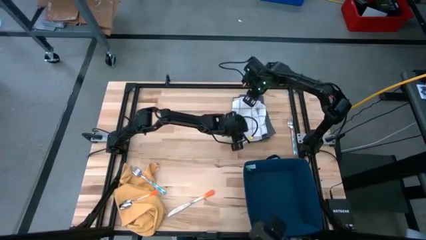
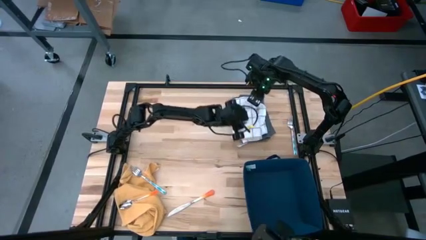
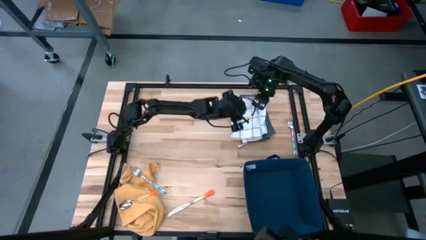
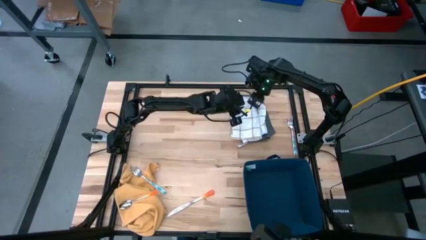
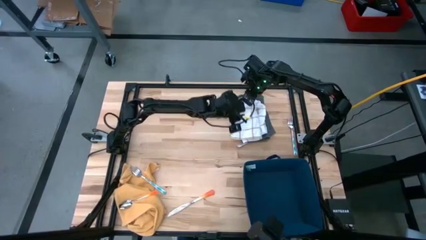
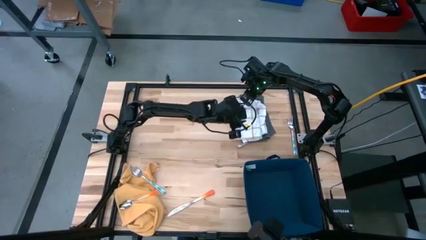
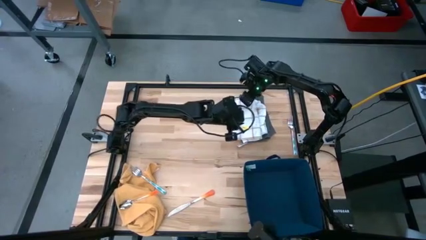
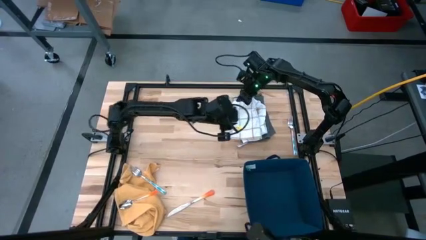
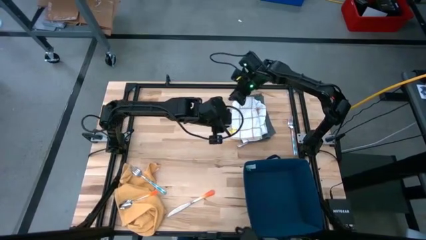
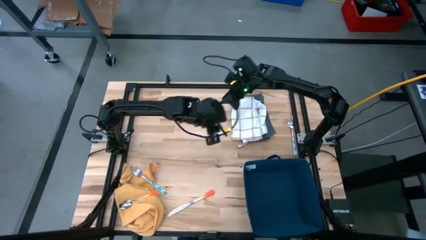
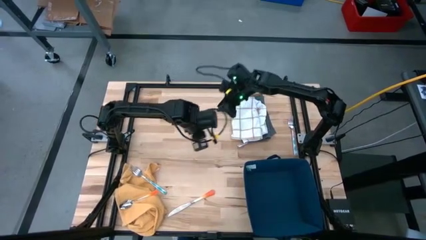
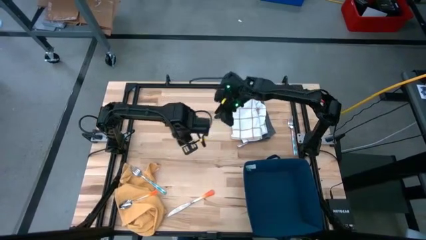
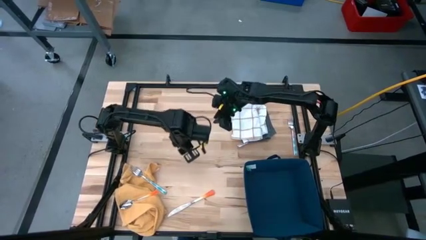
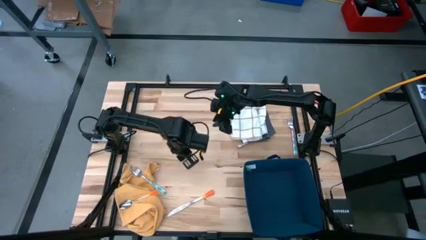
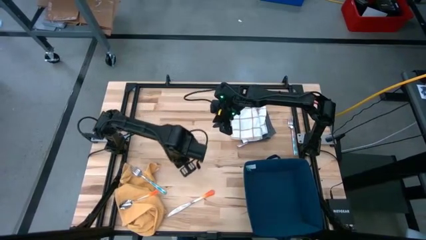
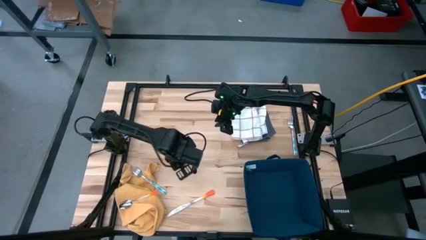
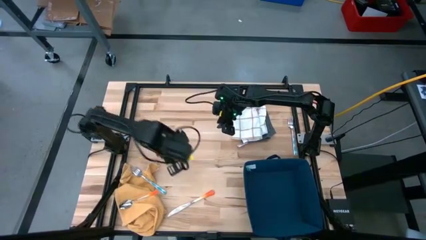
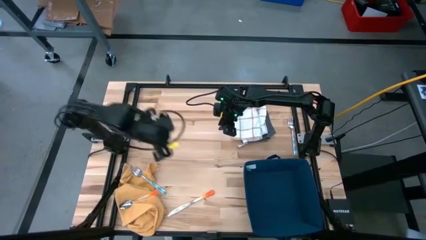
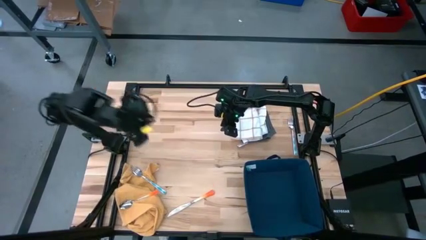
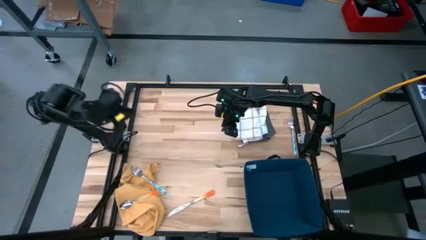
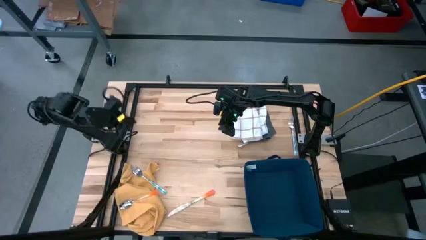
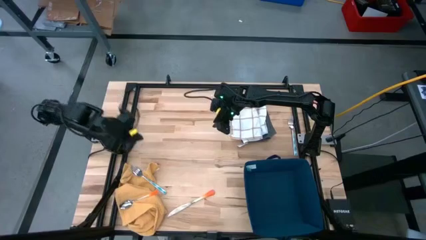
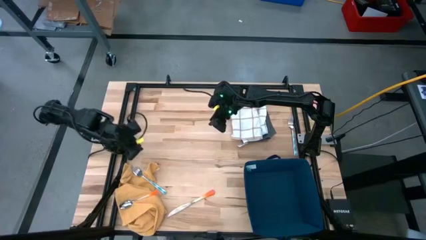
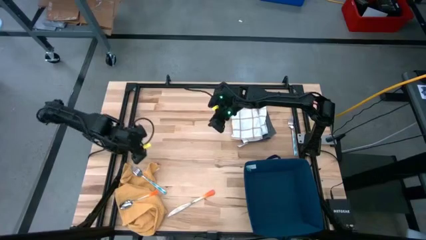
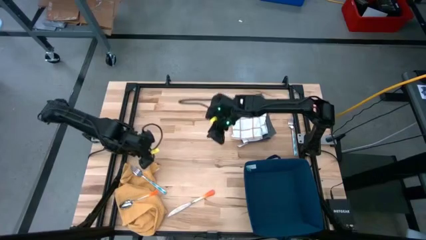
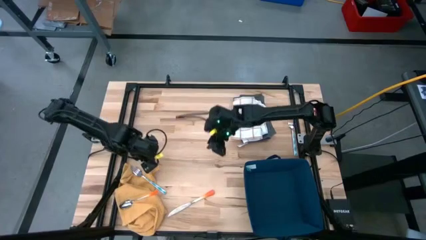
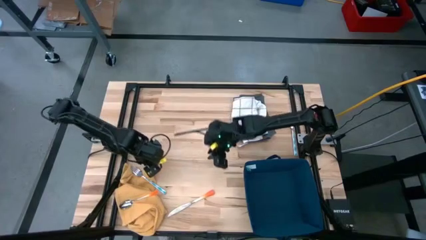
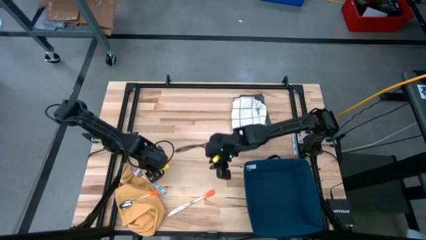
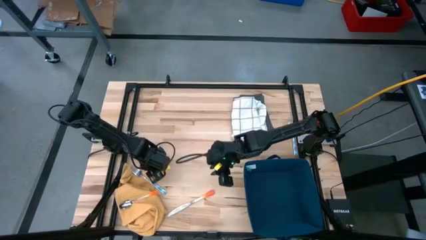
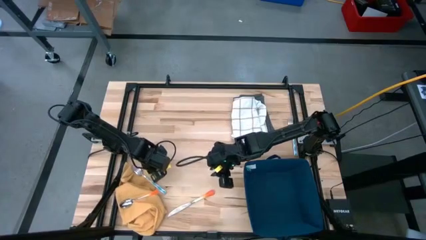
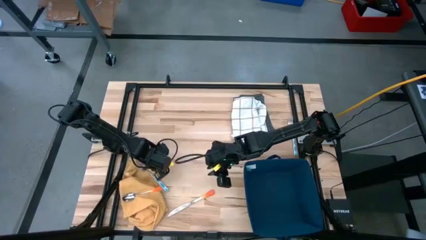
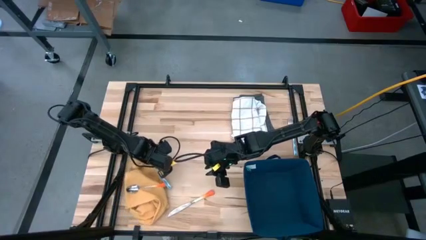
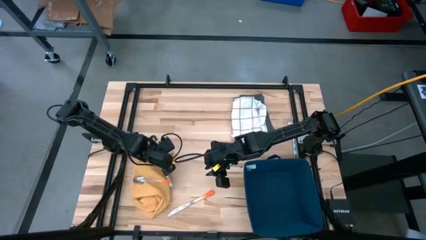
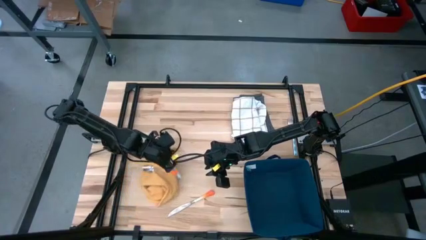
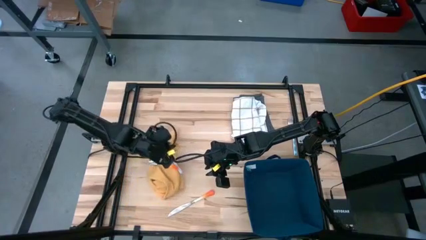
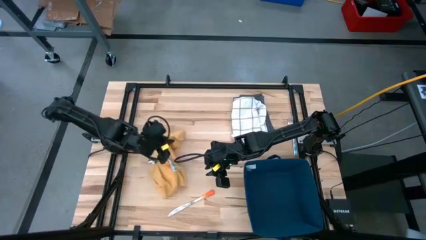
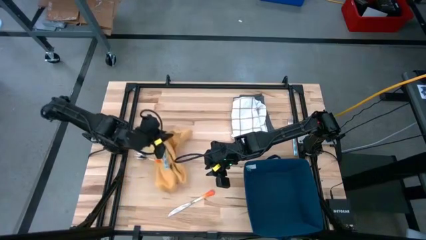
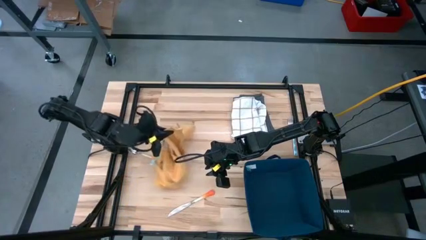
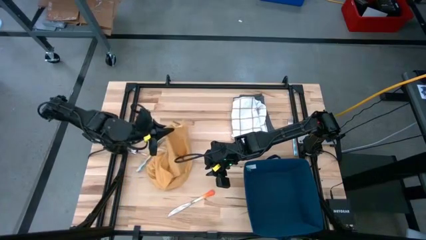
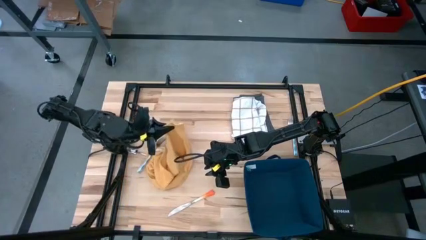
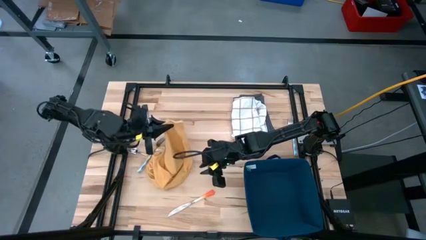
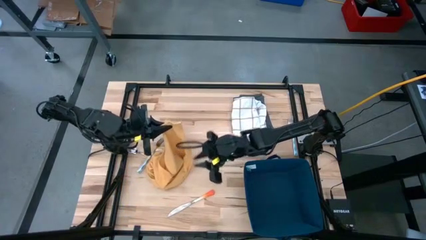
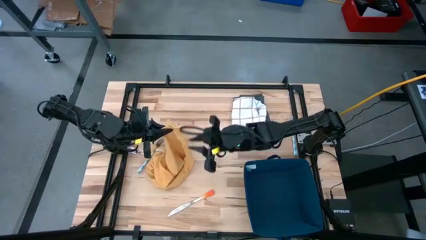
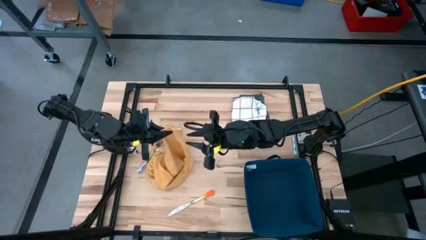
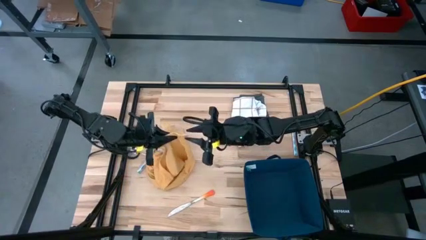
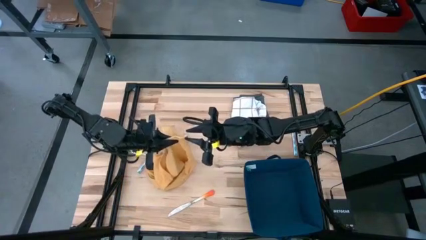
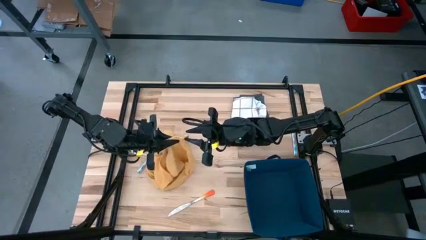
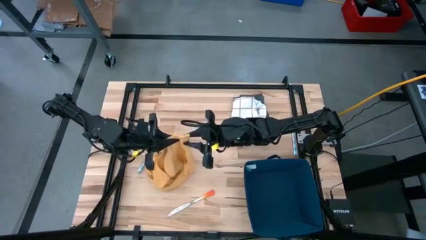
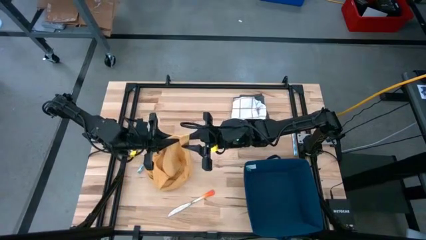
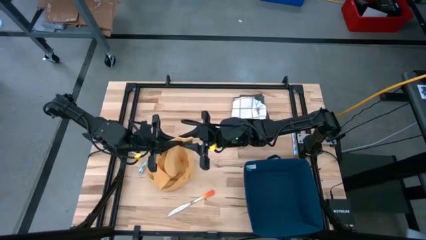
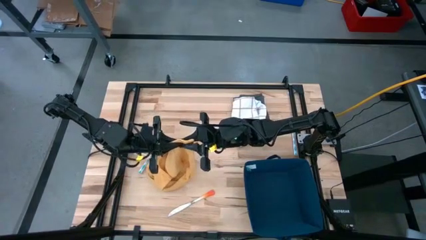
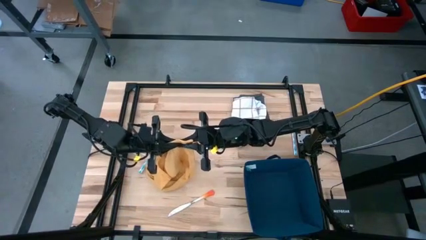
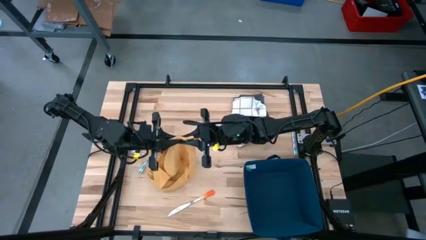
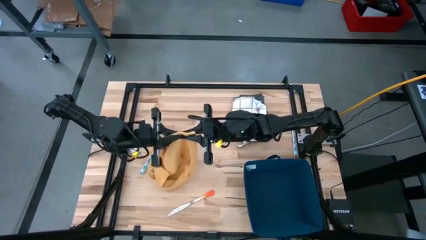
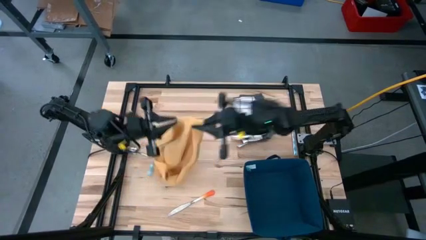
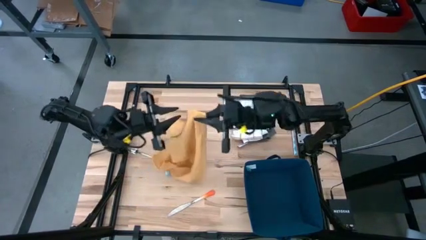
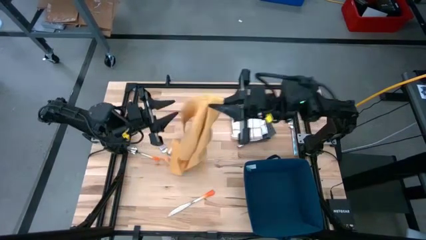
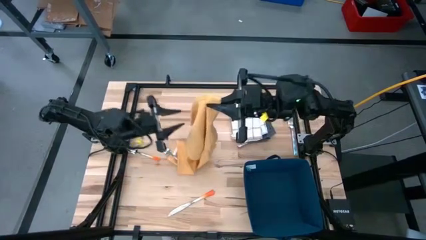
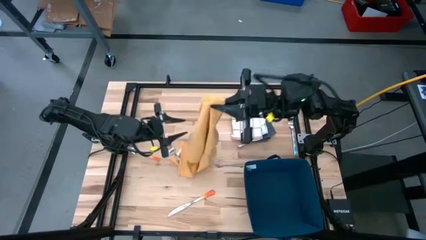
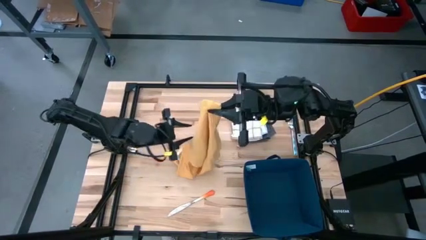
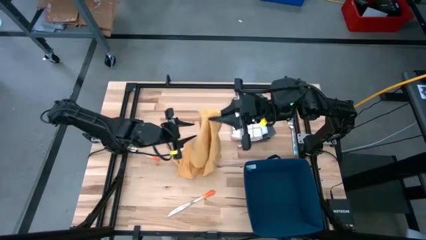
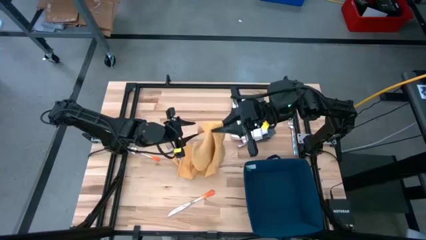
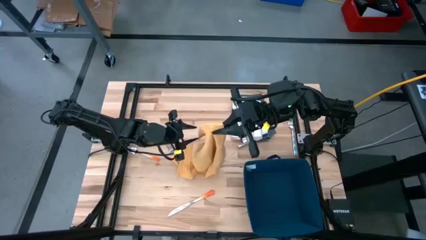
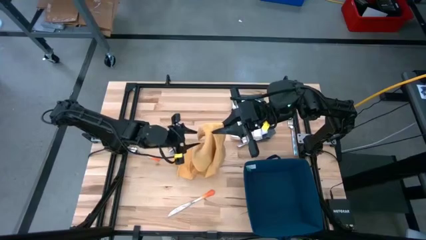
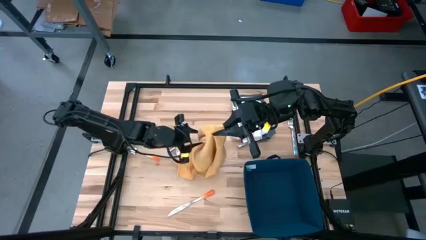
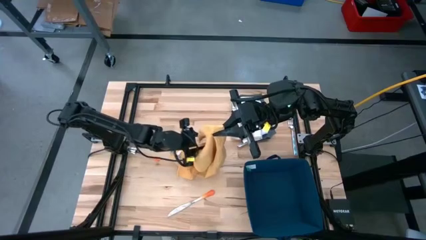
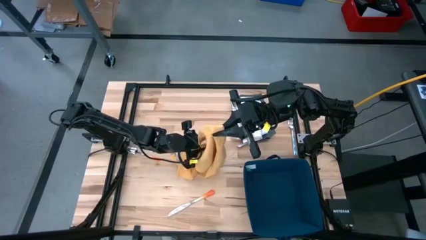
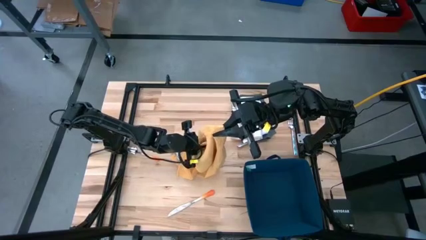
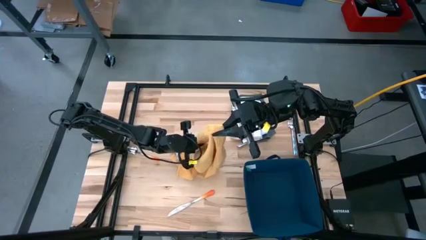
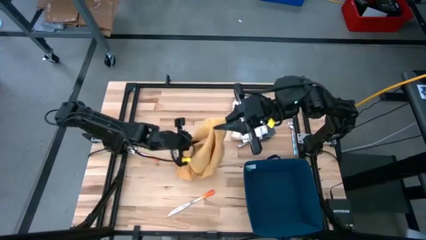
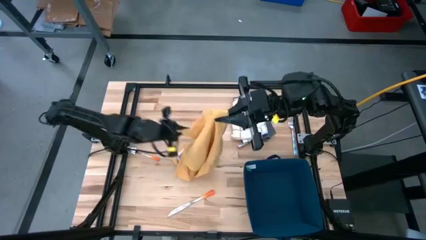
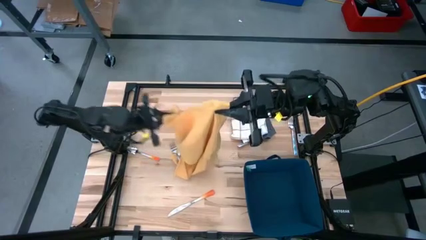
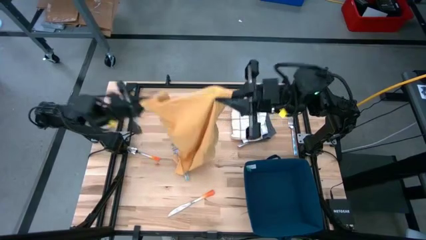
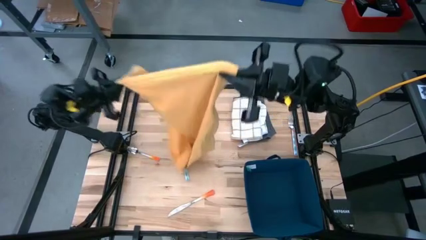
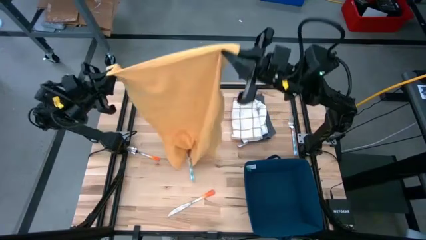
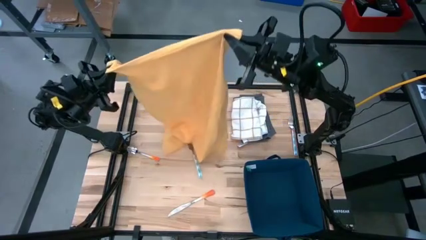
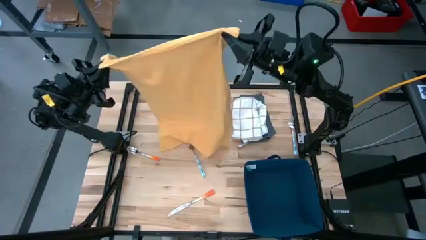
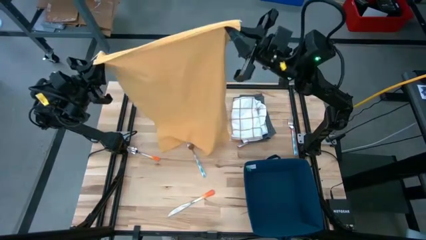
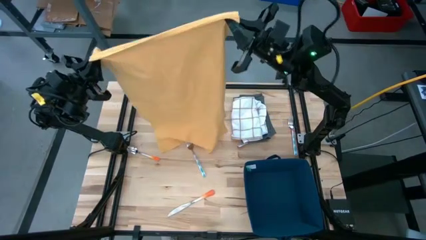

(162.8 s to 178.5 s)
Task: Fold towel
Fold the orange towel
